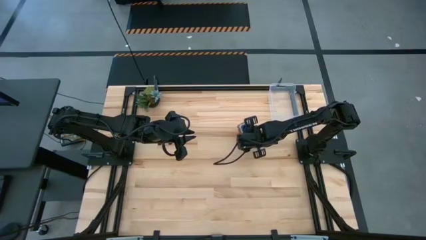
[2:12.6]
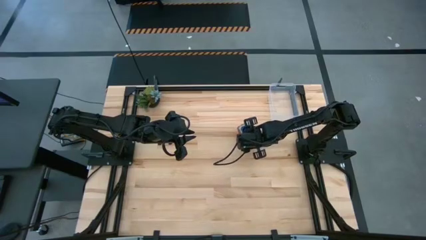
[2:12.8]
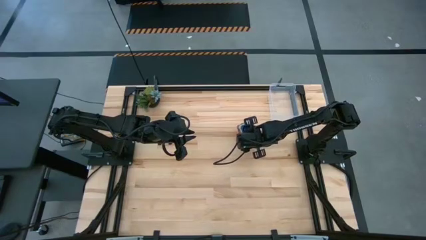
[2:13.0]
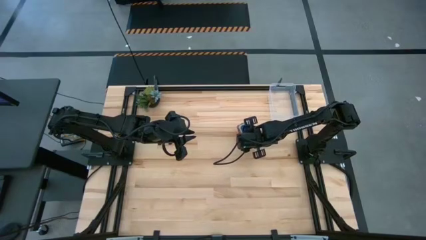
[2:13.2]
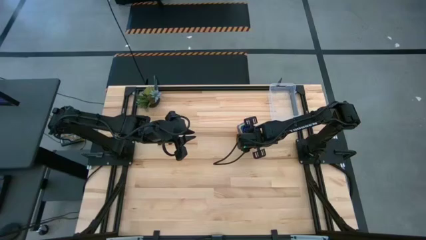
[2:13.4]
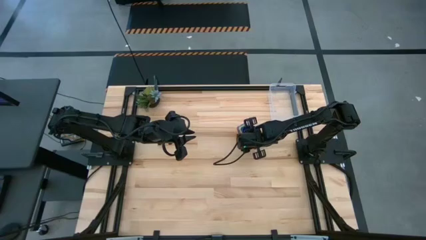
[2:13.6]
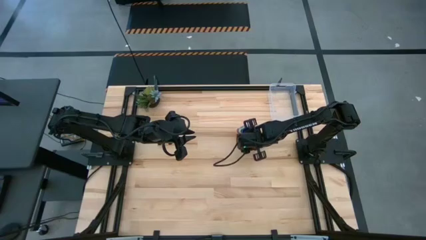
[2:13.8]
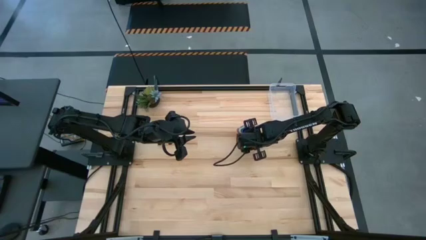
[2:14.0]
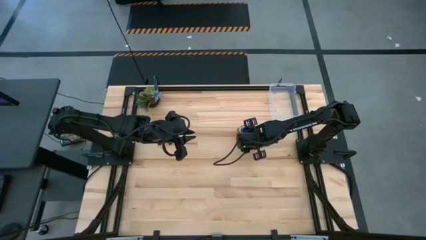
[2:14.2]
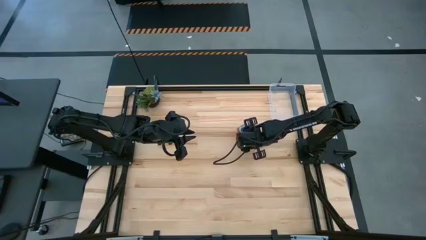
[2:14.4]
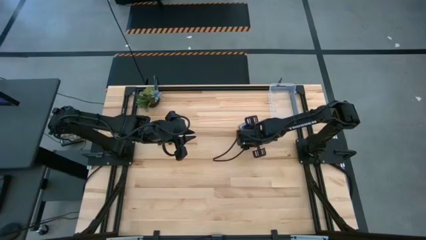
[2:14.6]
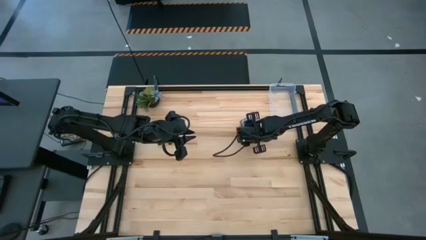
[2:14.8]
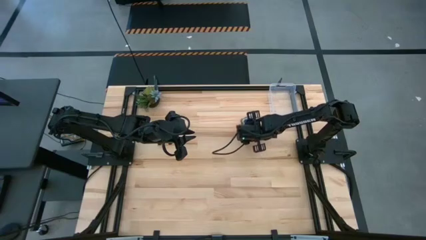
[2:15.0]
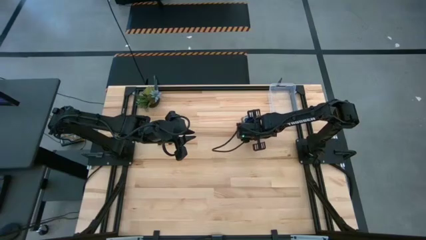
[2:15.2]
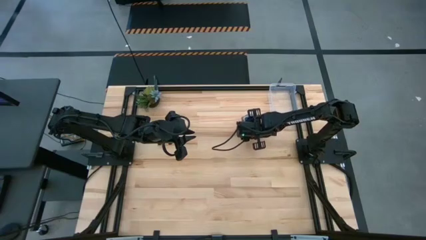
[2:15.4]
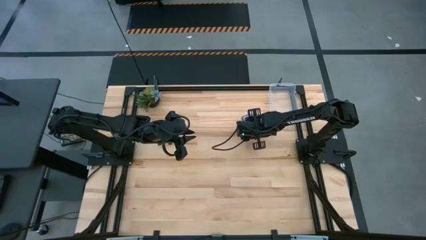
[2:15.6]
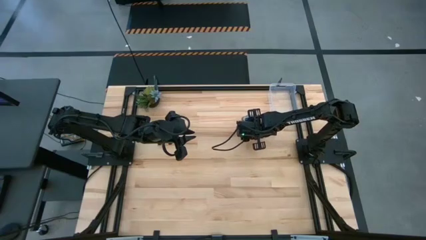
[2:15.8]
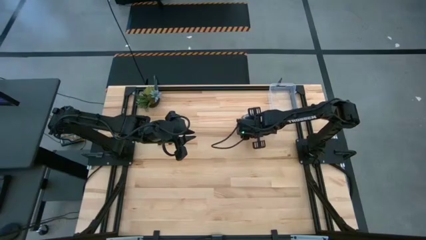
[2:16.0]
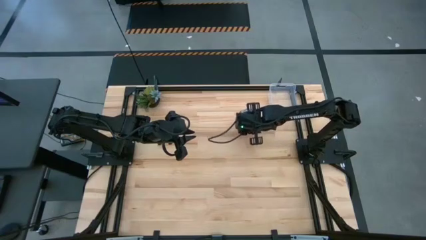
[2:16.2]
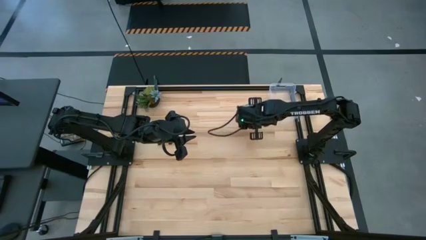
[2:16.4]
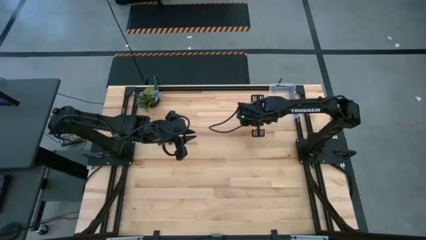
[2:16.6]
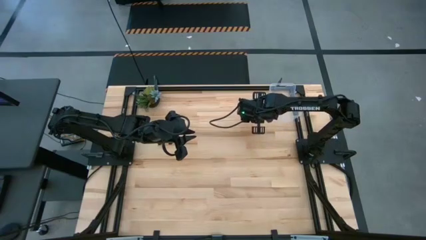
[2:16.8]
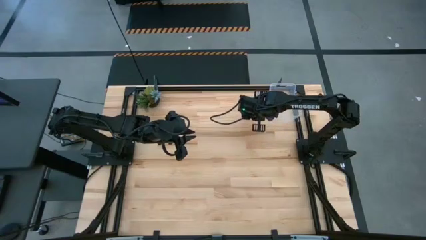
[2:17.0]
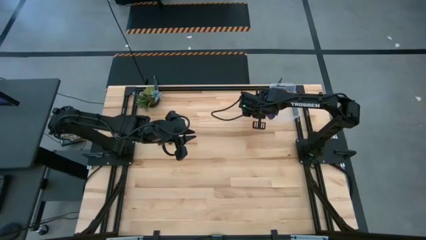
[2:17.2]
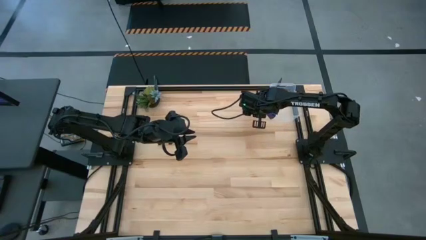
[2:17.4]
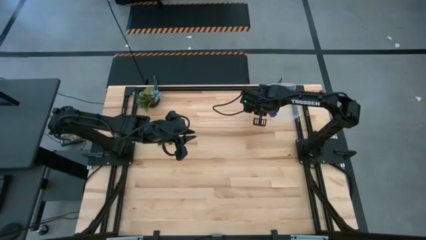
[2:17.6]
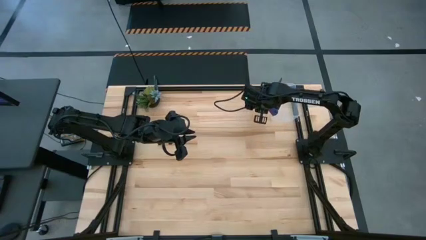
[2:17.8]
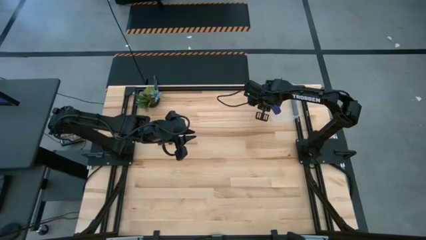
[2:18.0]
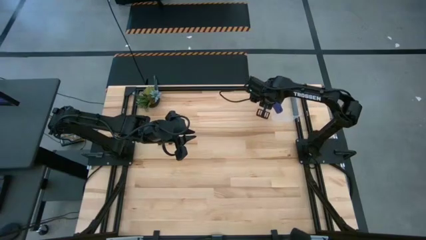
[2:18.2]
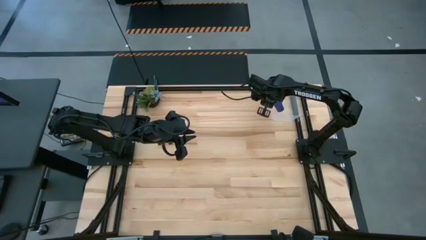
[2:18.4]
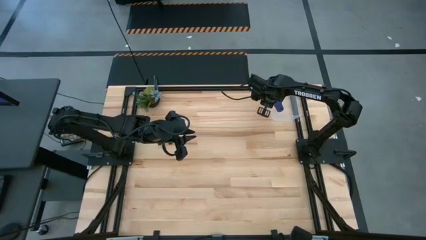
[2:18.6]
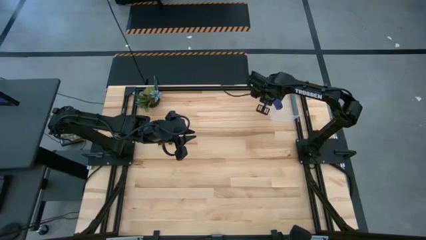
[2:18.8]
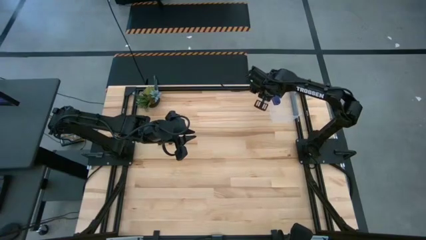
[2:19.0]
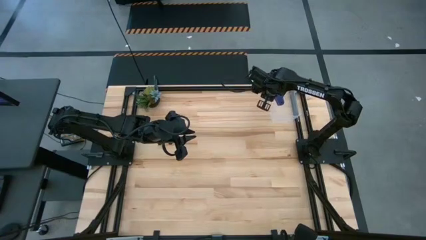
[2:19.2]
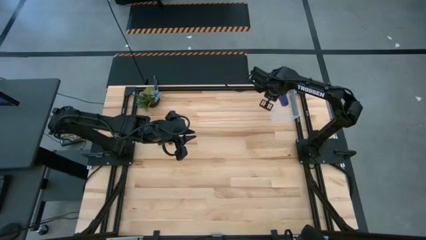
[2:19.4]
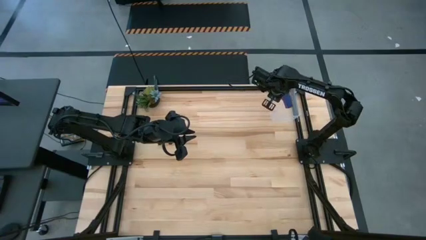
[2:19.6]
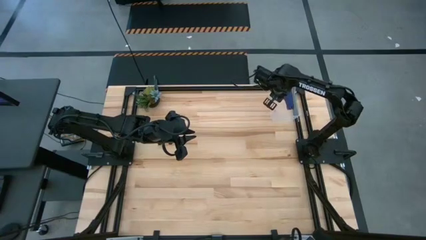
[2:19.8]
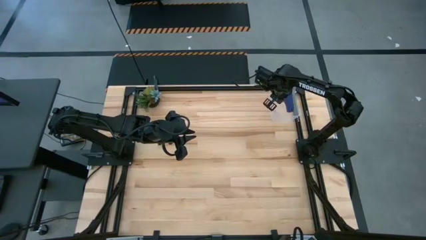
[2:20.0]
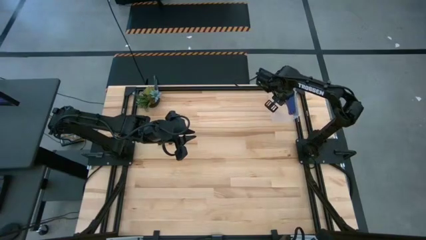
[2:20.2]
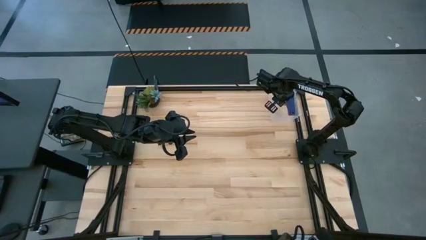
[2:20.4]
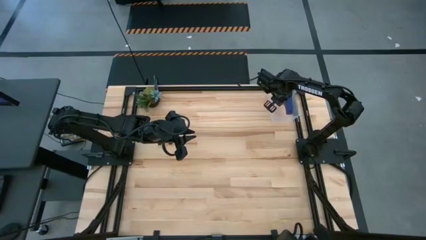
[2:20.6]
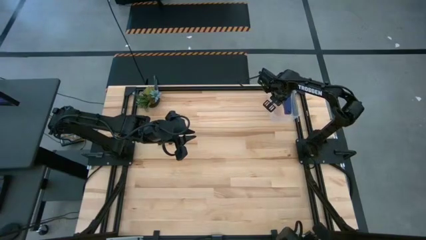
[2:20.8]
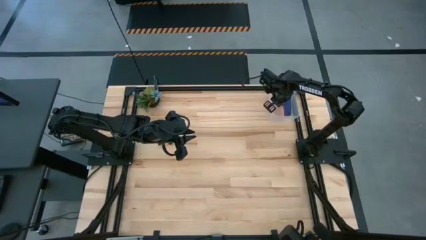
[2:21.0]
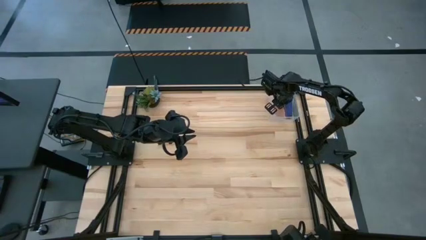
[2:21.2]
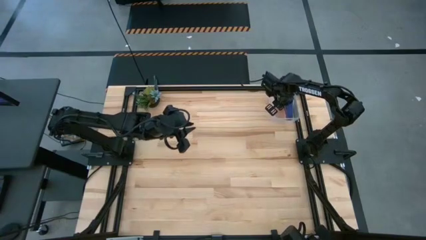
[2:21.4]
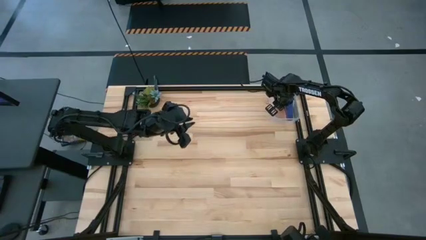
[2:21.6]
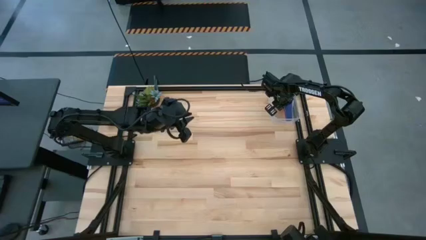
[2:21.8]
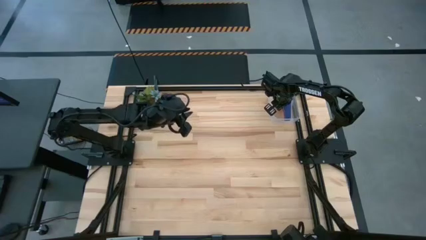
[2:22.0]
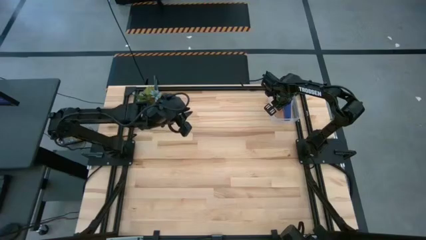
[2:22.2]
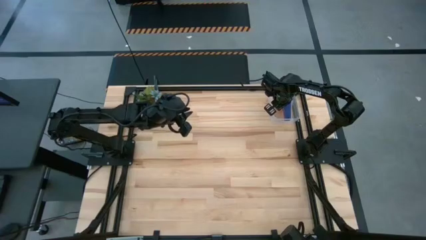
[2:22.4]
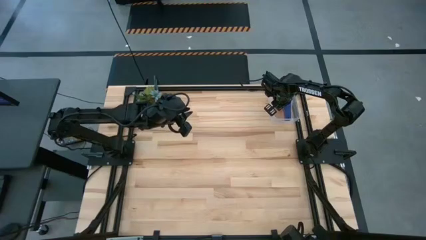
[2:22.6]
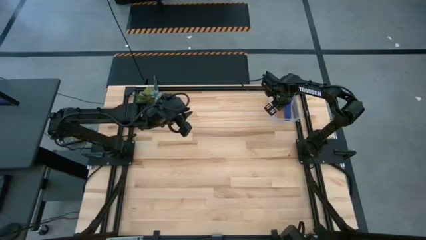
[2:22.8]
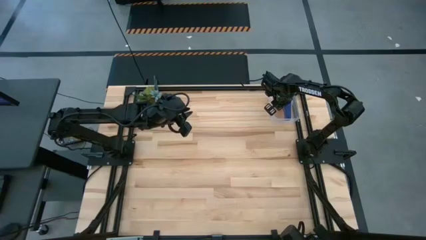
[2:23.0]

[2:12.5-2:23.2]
Task: Nest measuring cups in basket
Put the stacked measuring cups into the bin

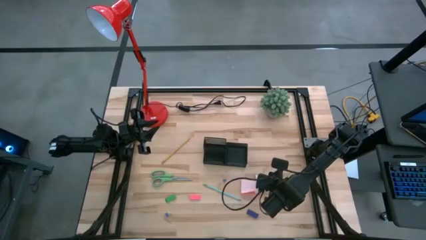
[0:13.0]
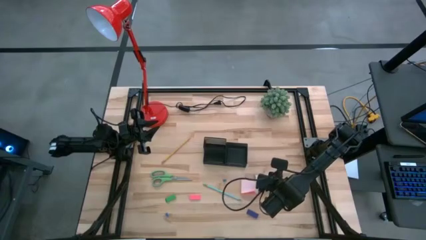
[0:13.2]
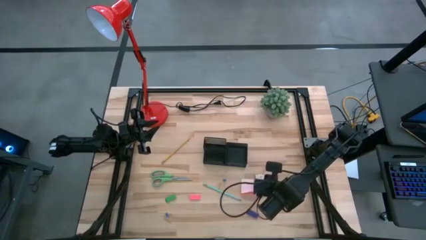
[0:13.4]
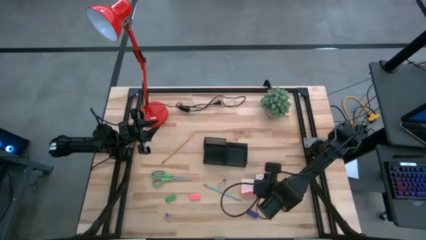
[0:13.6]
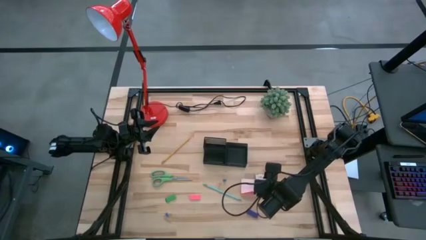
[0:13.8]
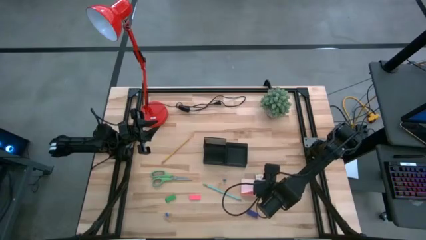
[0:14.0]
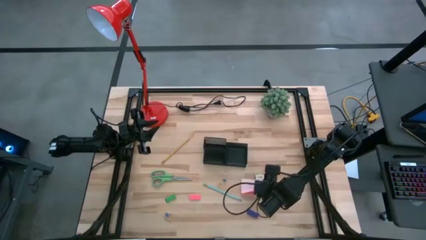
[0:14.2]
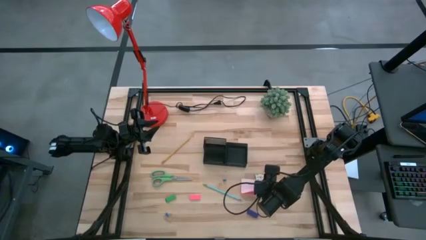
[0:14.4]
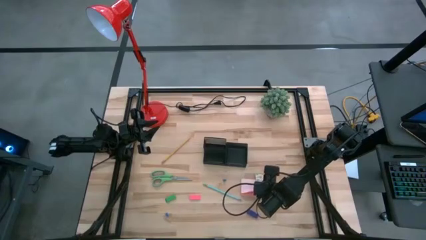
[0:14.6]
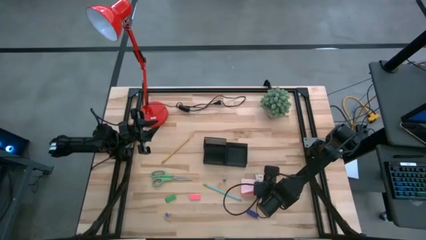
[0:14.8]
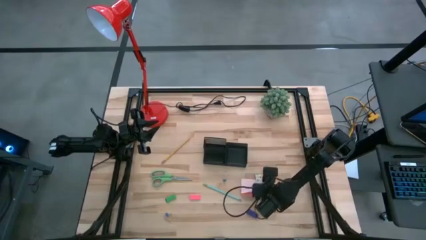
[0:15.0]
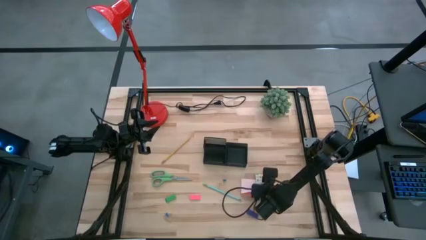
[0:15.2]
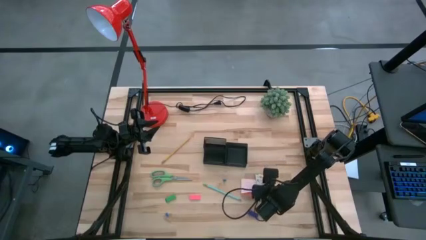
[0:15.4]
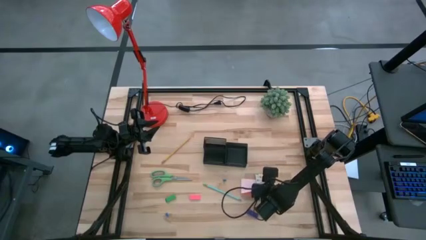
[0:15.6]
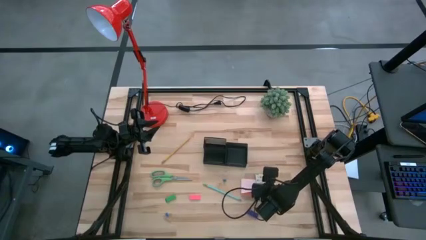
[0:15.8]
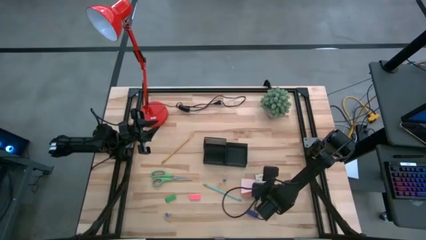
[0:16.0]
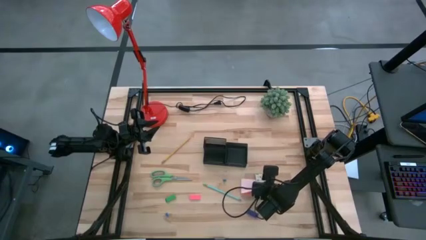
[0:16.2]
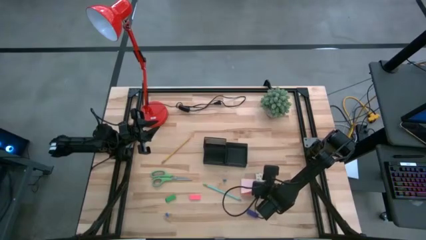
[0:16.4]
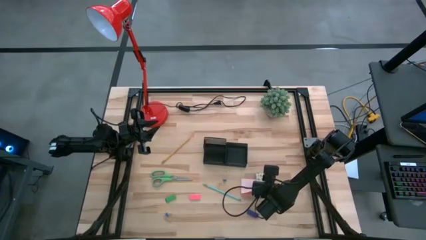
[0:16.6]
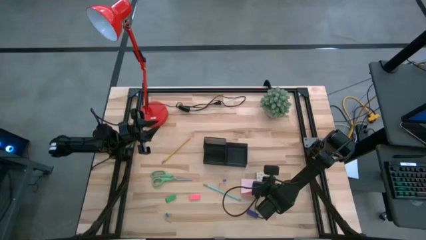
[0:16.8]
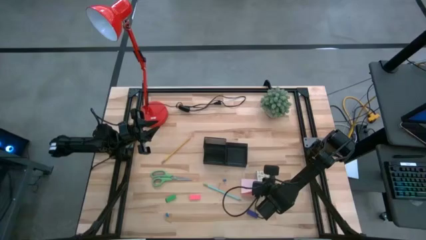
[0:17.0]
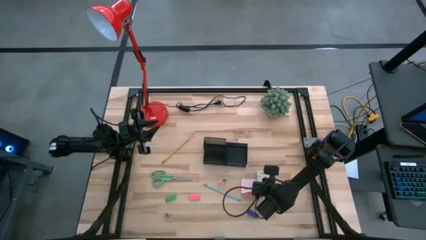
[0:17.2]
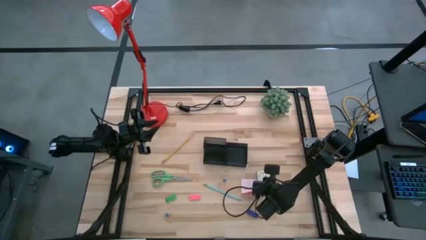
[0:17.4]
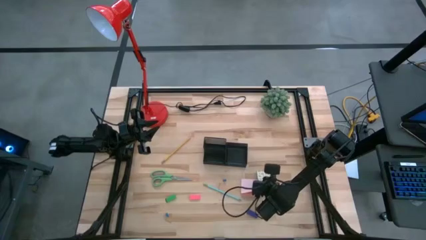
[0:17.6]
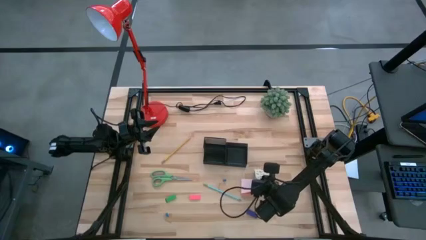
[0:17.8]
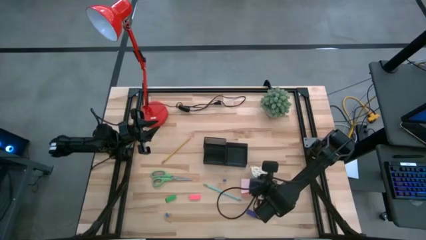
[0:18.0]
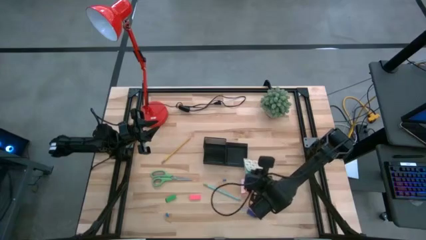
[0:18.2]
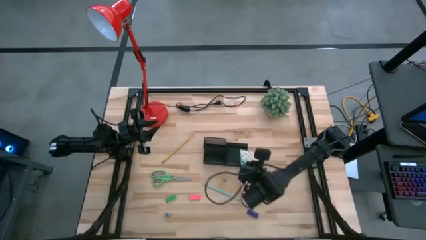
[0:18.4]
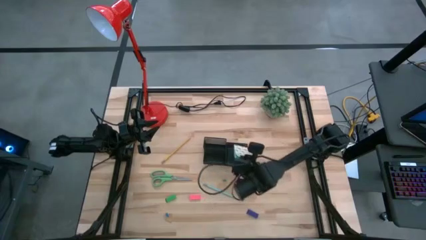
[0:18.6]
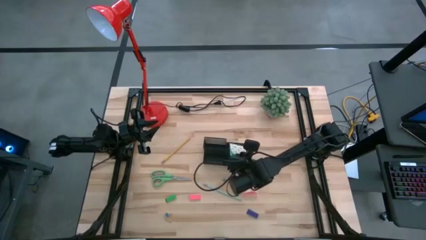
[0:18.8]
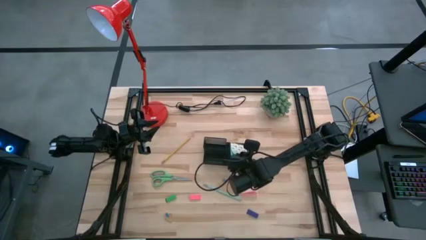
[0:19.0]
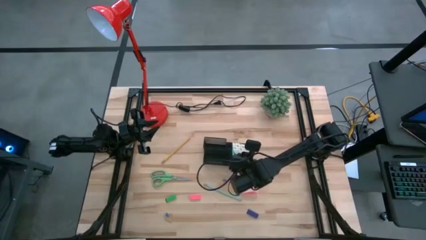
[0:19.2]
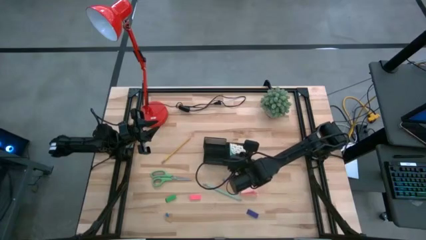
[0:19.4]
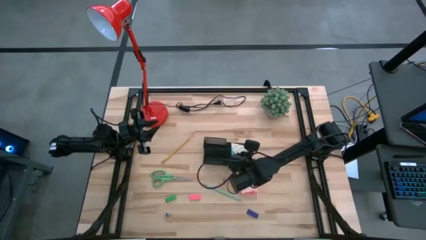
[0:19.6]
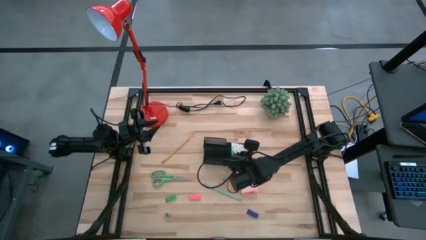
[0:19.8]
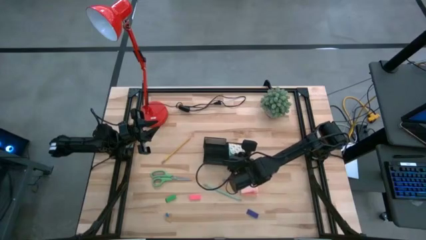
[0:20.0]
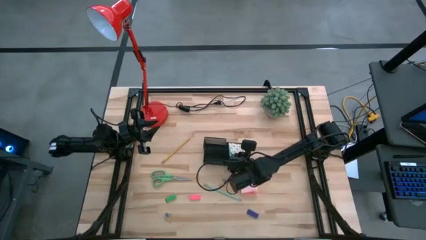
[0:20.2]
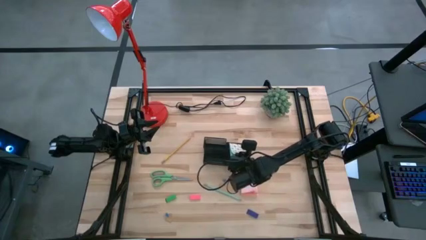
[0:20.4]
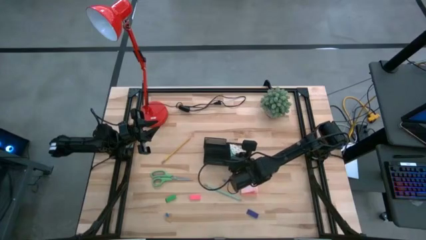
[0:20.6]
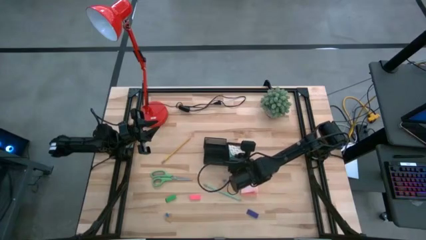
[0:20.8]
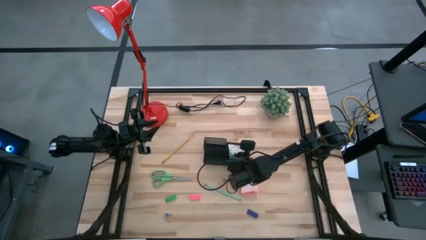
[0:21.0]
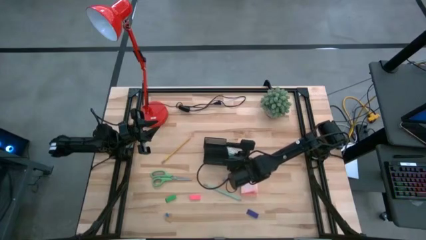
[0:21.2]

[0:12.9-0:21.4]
Task: Pick and place office supplies into organizer
Put the green sticky notes into the black desk organizer
